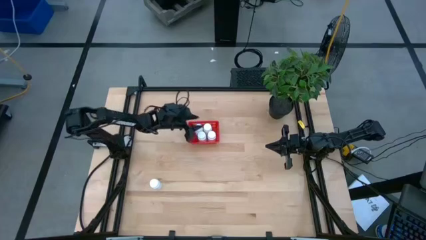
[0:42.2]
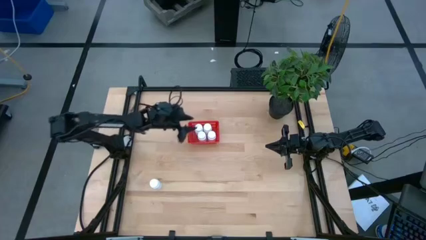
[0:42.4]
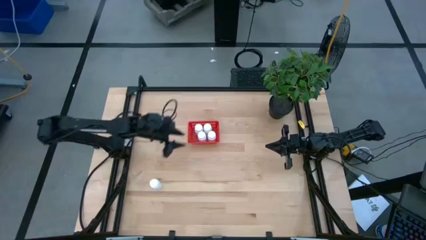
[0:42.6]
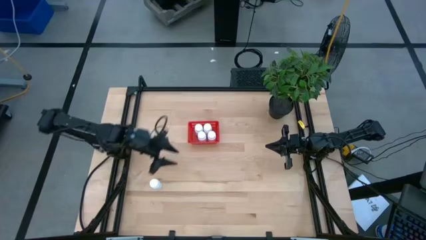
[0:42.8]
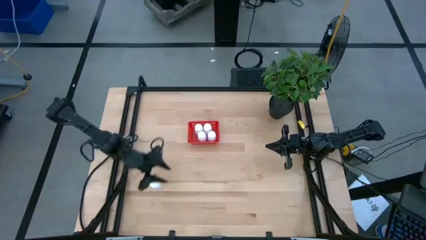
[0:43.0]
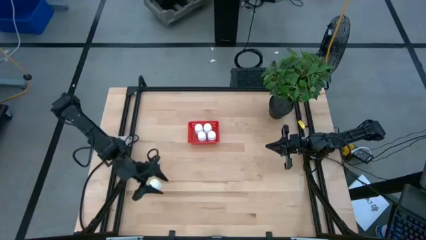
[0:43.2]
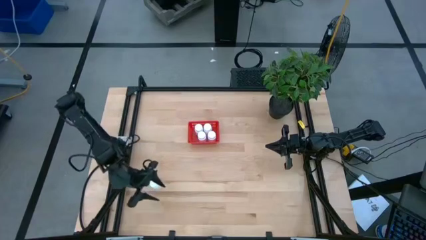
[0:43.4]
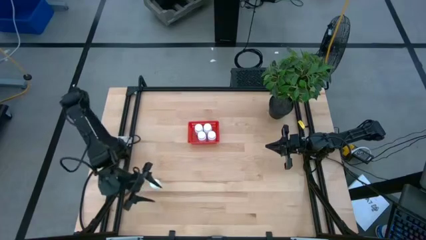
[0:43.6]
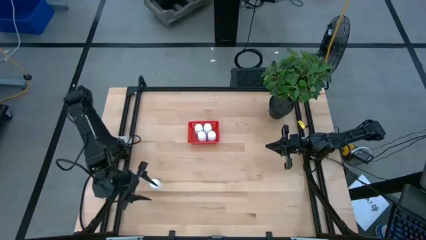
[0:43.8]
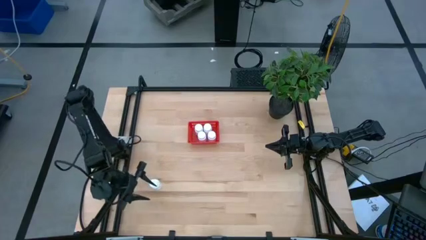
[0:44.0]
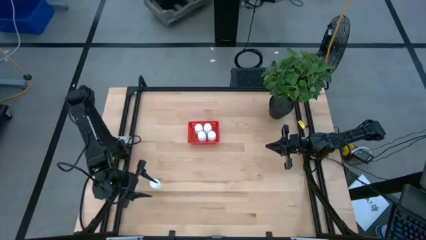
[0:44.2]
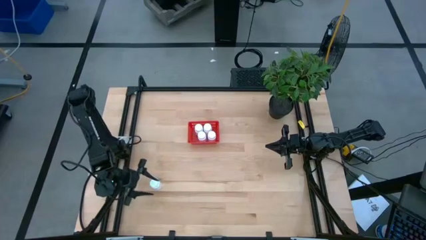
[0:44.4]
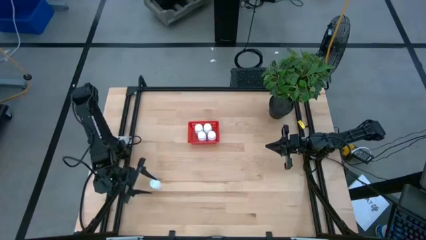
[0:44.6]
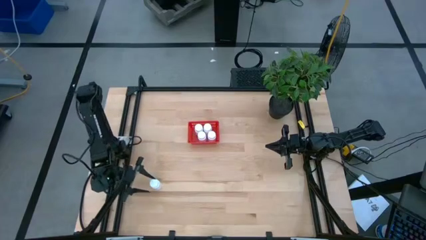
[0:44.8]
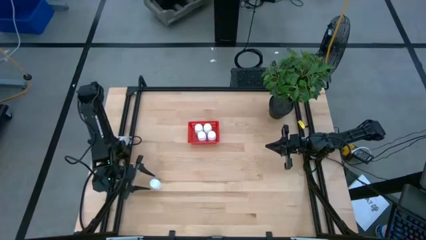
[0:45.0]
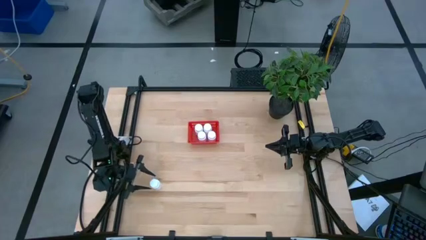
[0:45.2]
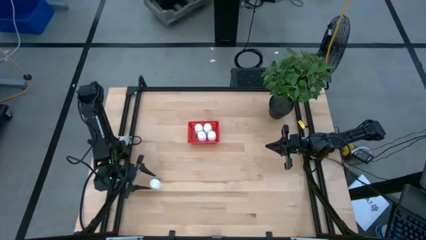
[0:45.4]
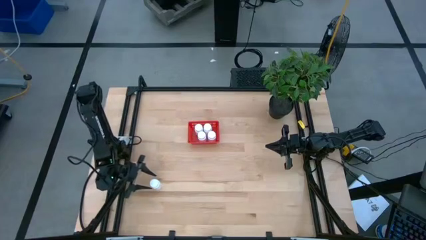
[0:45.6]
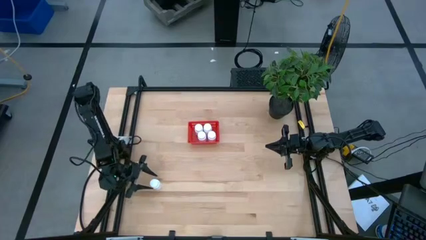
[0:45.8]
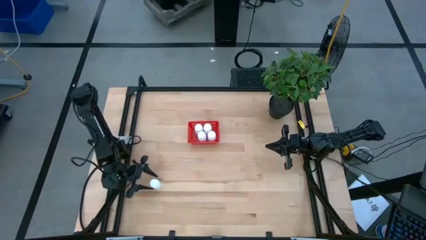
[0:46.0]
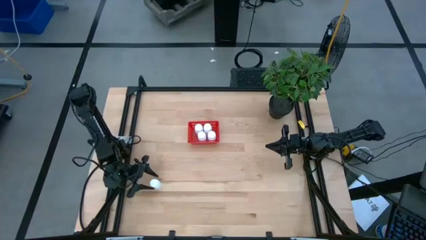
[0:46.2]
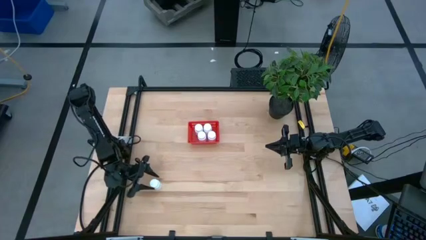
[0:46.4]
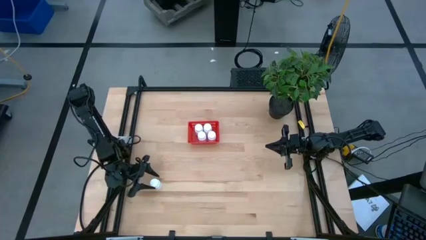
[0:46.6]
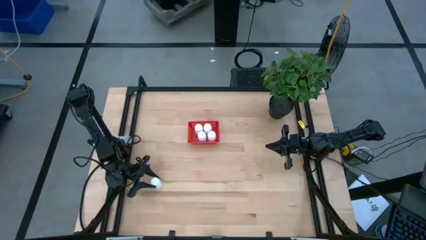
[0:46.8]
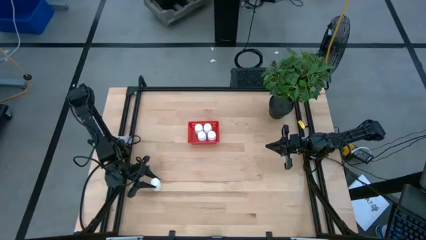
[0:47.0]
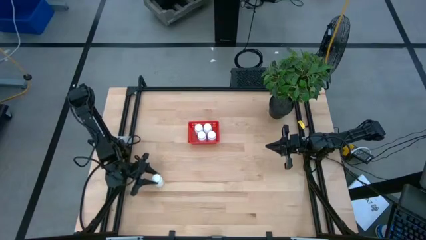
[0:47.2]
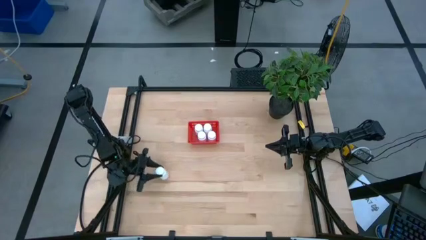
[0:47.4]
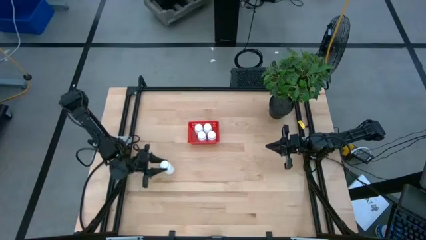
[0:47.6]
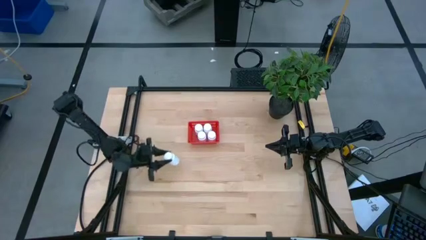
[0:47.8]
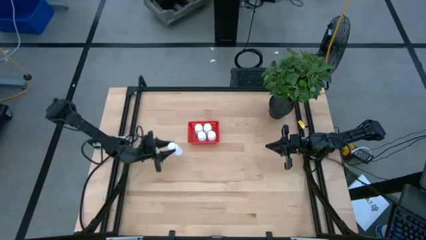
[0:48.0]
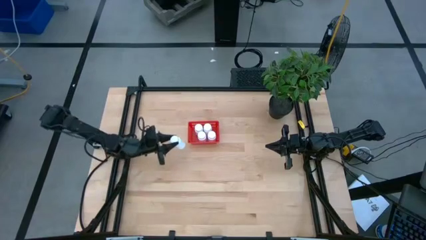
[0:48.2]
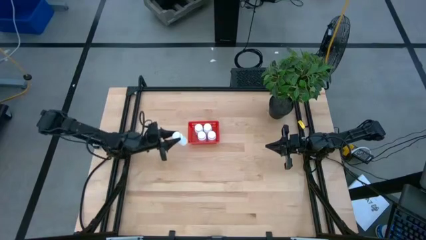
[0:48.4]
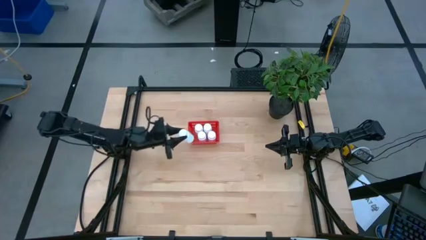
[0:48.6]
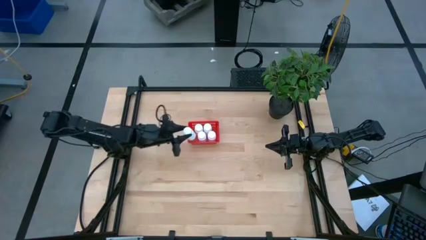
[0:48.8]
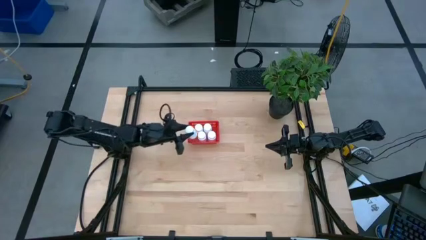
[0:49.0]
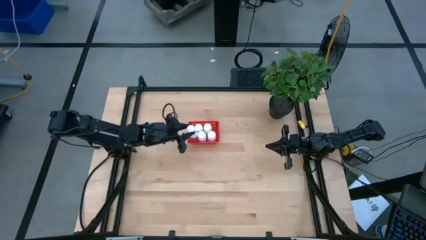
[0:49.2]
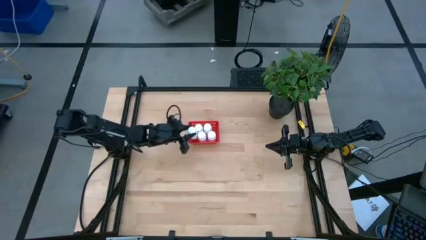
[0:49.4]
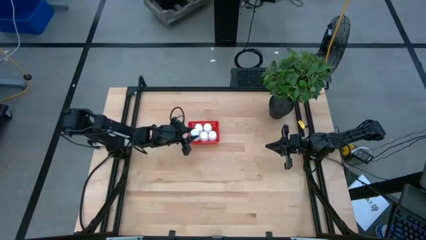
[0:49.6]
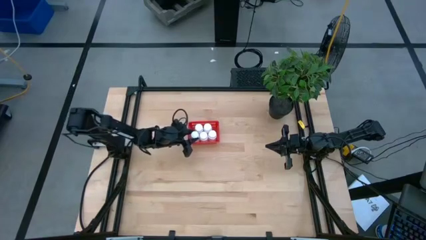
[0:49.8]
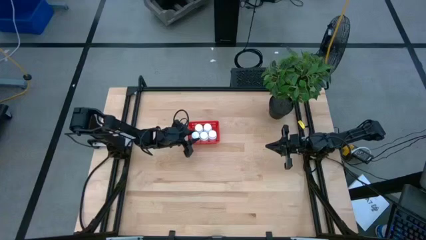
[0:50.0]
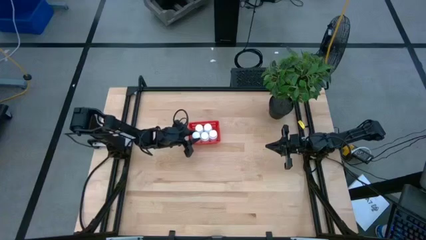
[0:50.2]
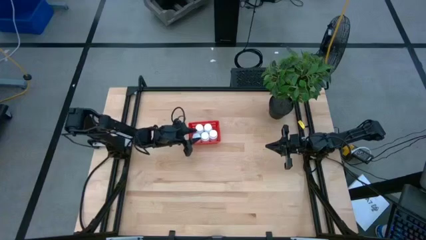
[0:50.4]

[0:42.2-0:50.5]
Task: Pick and place pill bottles into a basket
Put the white pill bottle into the red basket

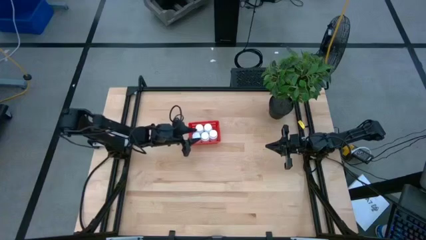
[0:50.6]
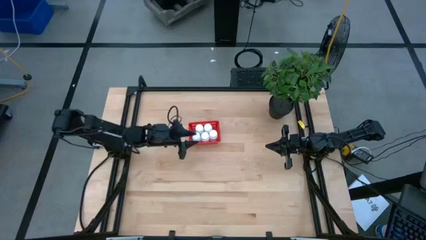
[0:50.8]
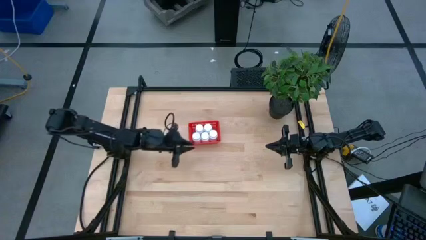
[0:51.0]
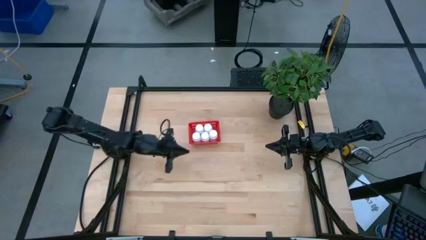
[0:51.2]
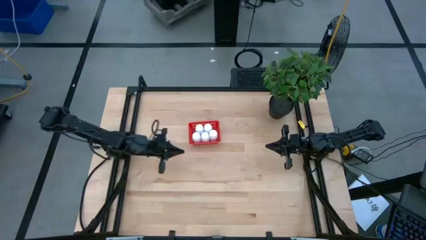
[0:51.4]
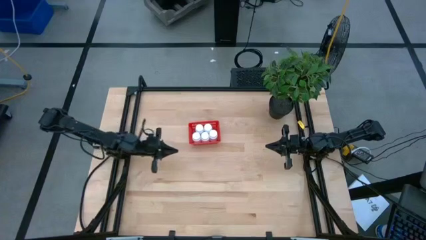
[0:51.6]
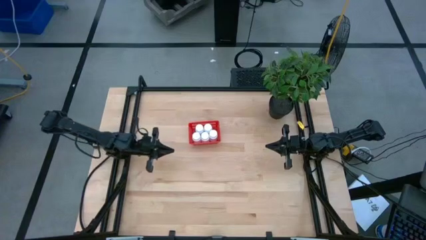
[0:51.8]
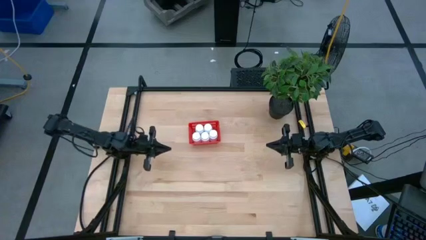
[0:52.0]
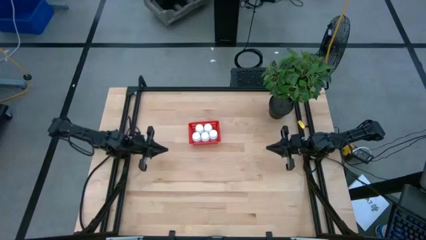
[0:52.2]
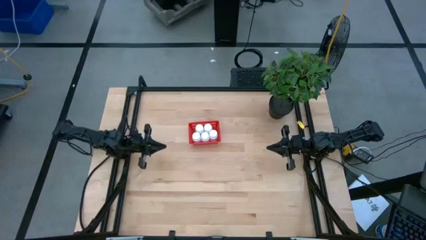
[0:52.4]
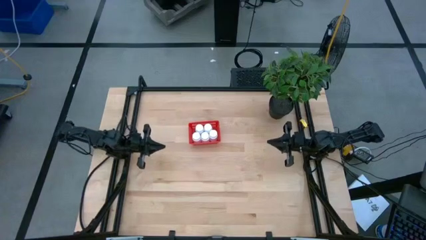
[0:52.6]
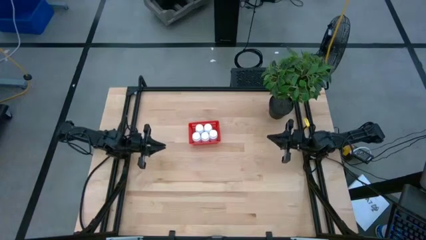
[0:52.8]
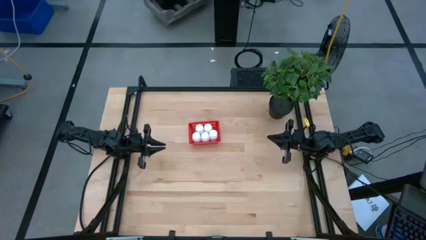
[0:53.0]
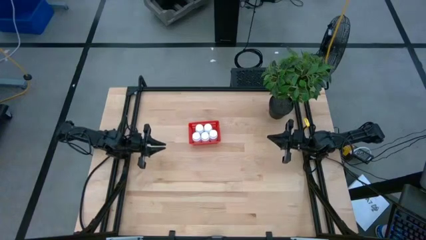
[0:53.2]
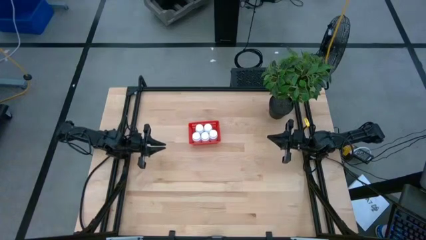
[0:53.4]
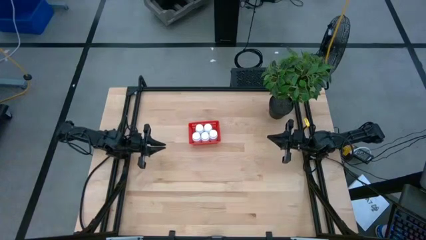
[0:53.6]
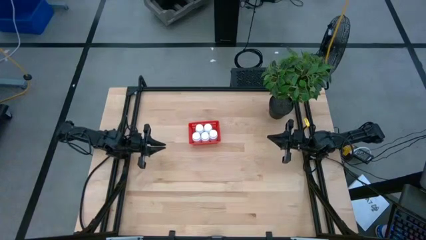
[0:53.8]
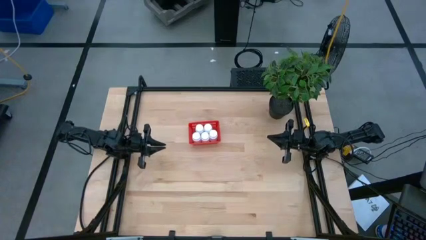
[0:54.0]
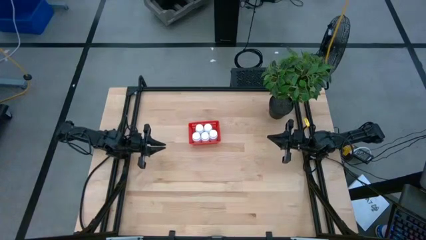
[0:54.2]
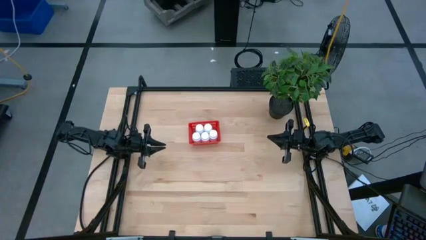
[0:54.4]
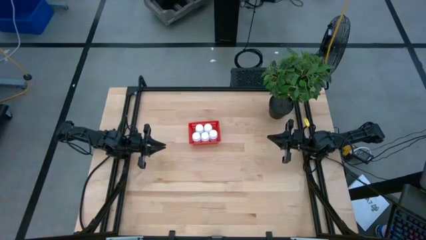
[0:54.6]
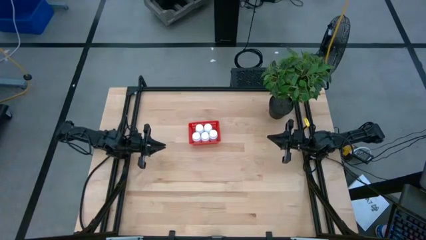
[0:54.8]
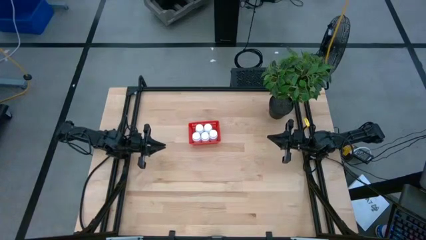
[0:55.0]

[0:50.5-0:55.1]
Return To Home Position
